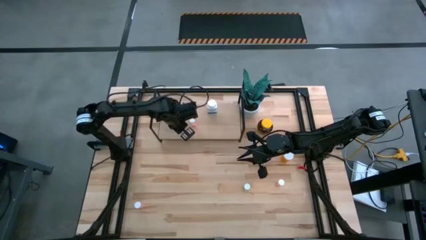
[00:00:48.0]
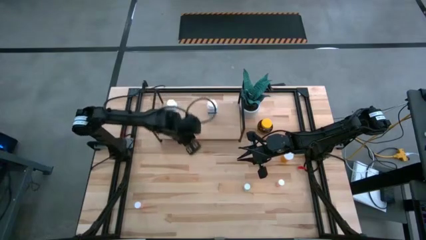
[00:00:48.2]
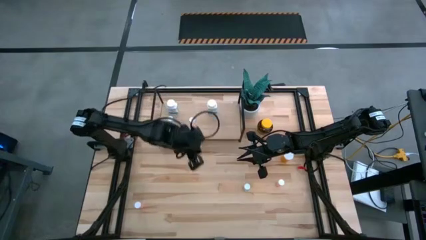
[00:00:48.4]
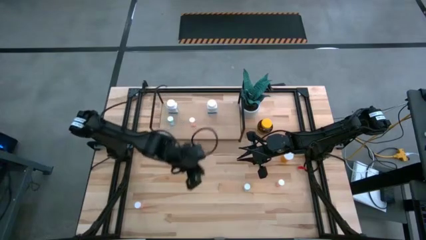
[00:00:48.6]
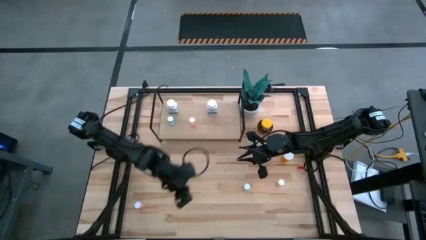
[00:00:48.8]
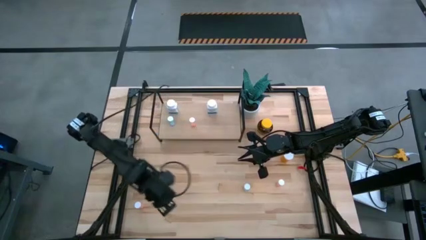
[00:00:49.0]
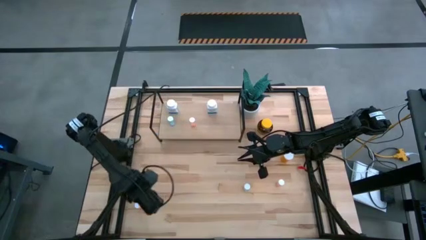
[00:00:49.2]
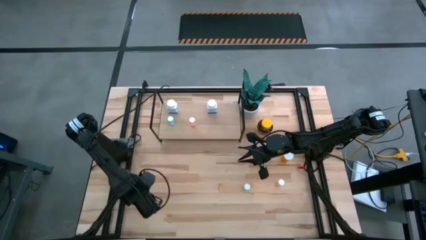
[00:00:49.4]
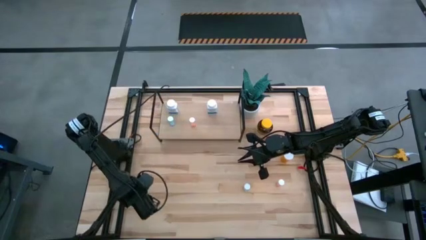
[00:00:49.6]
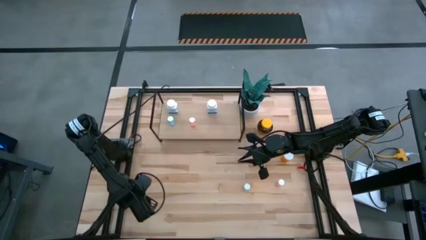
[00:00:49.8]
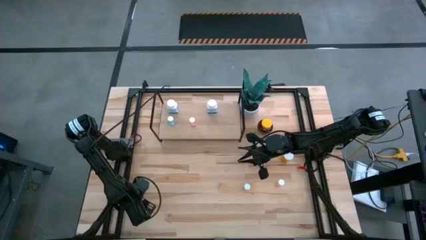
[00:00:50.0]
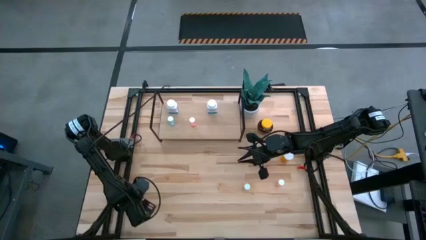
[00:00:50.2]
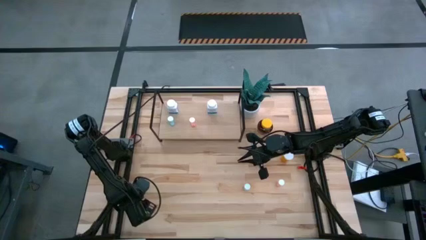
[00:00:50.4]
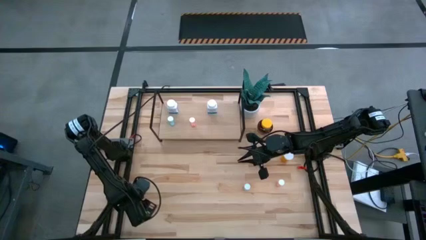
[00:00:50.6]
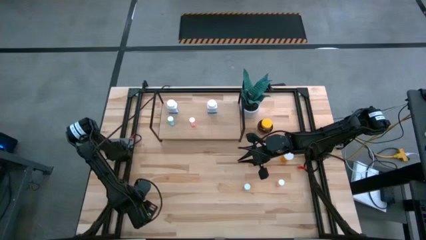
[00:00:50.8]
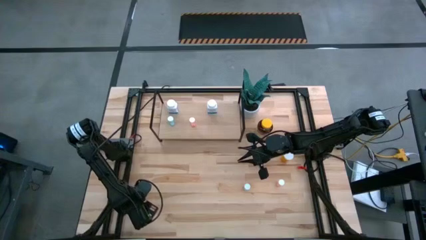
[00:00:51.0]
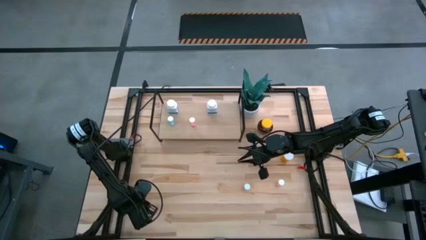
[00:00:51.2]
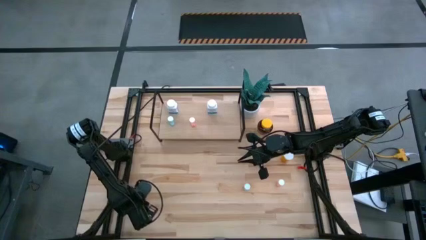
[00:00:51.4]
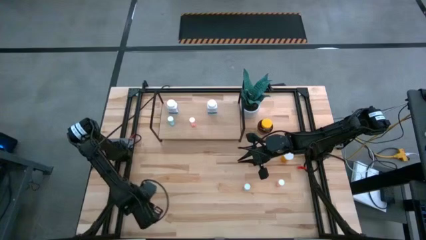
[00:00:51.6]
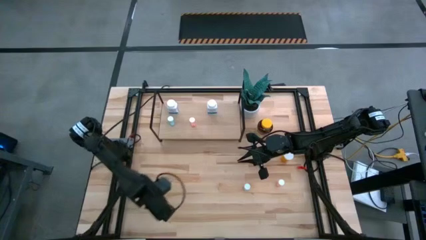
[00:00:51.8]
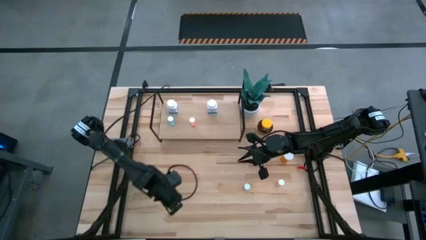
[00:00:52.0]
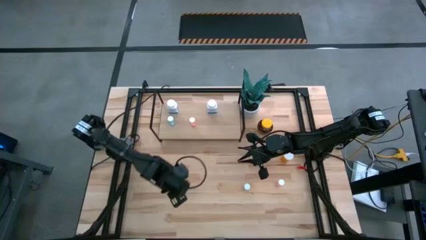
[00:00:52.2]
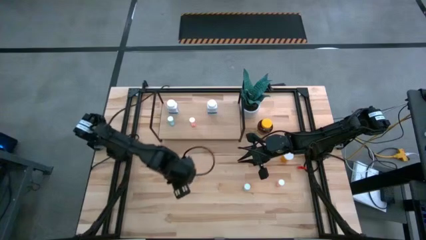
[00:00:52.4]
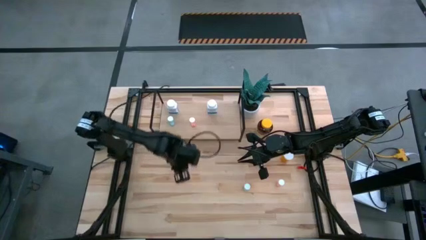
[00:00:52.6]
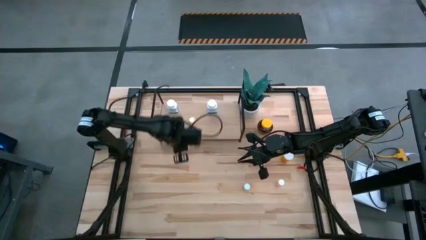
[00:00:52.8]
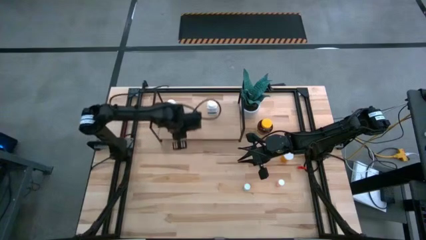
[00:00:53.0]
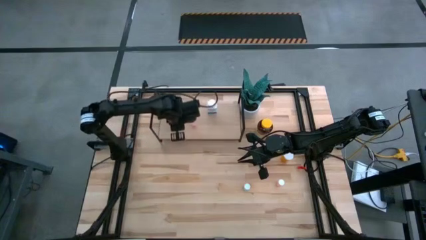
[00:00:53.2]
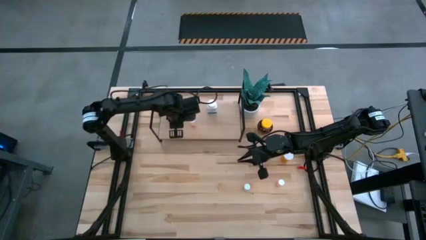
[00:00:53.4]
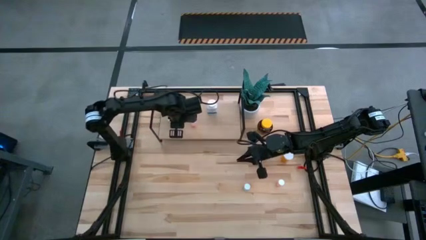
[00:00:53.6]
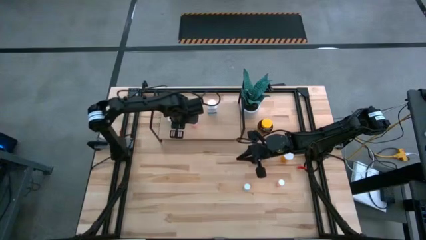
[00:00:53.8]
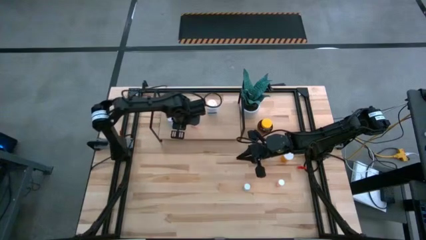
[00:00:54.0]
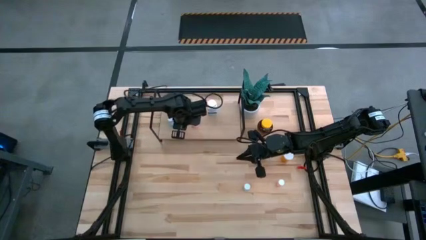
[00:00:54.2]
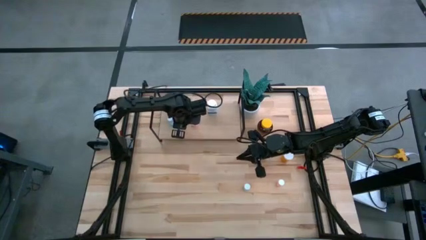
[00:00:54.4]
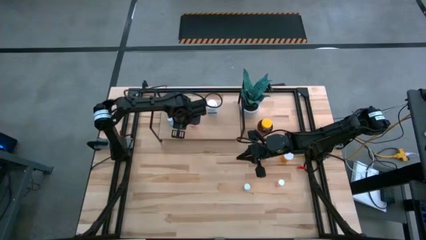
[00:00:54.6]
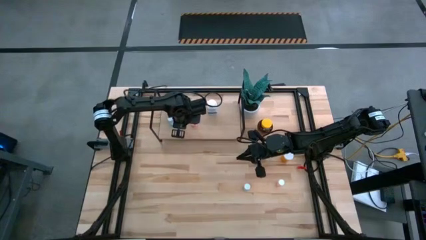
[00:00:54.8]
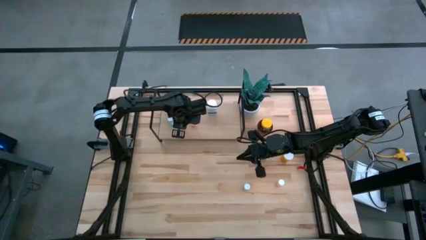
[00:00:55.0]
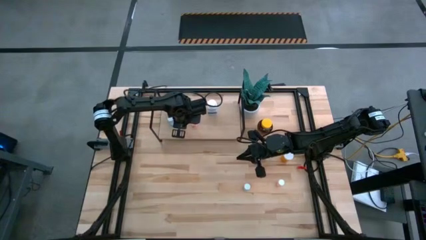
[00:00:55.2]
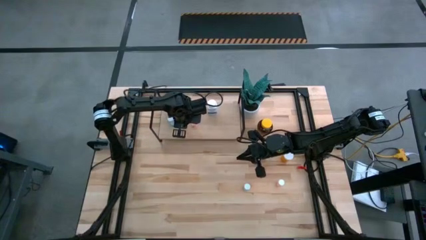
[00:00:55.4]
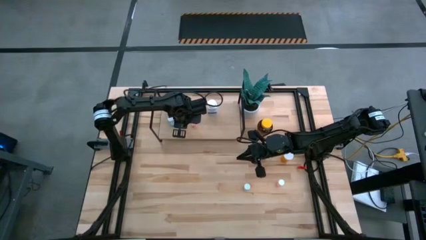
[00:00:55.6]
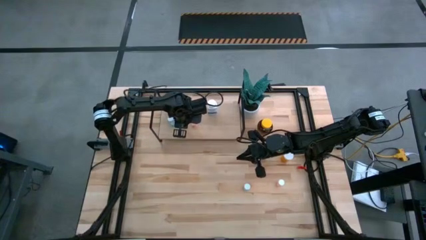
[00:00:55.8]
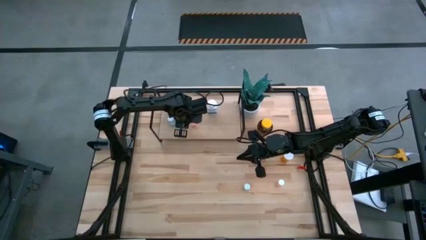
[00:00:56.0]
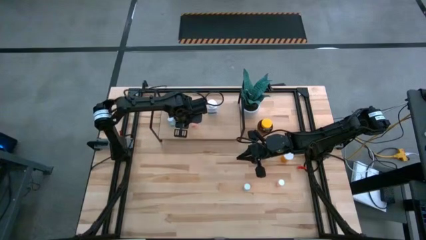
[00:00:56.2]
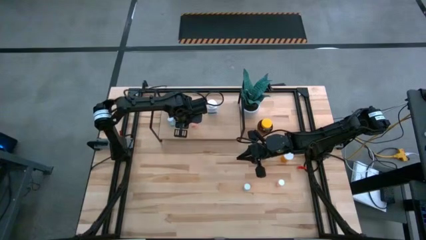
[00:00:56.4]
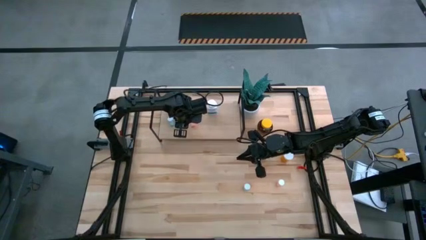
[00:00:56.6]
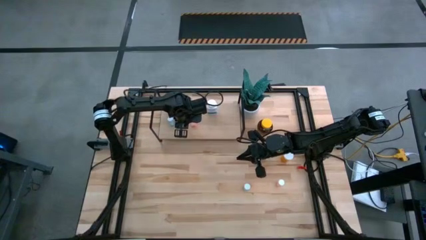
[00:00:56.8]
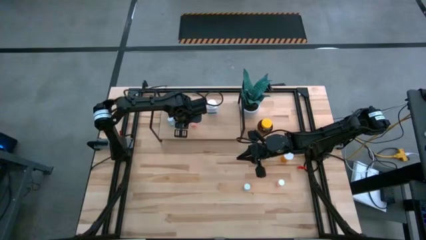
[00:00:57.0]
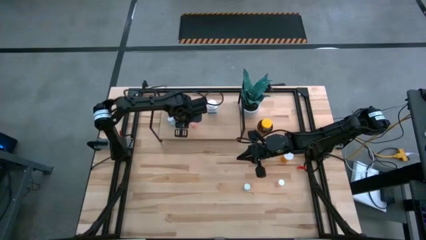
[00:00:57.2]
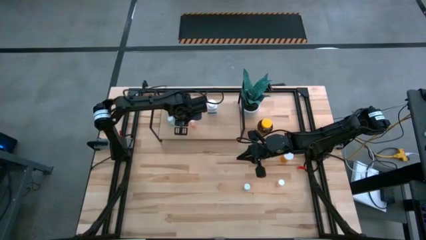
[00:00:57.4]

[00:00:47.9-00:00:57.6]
Task: Pick and place medicine bottles onto shelf by color
Put the left pink medicine bottle on the shelf

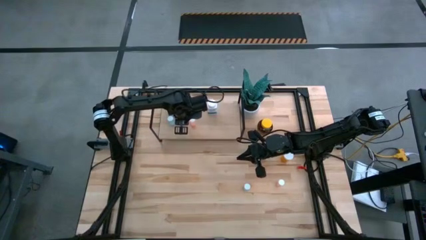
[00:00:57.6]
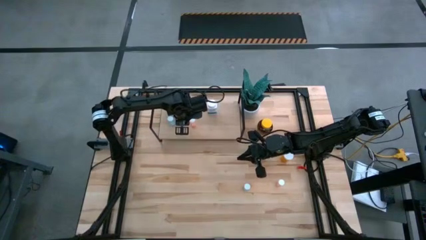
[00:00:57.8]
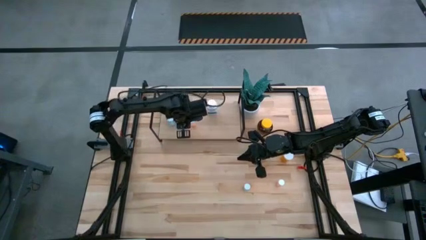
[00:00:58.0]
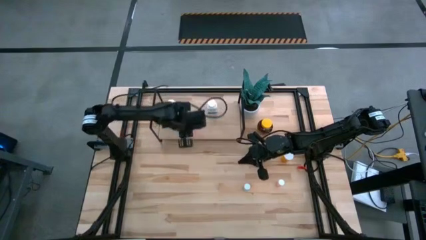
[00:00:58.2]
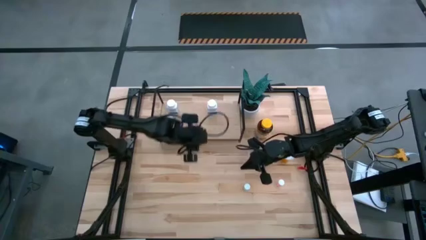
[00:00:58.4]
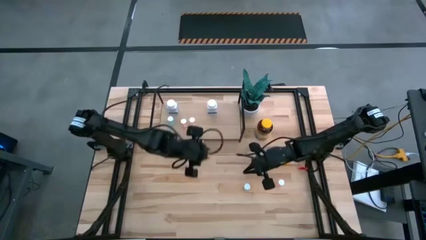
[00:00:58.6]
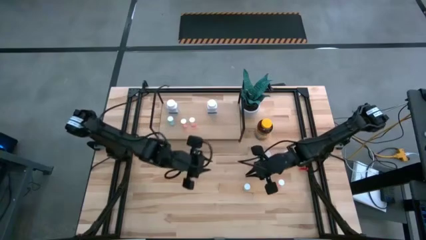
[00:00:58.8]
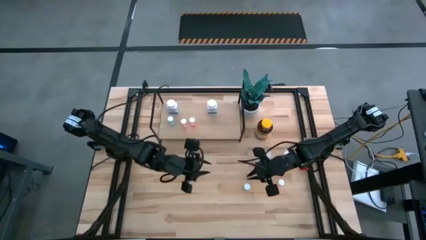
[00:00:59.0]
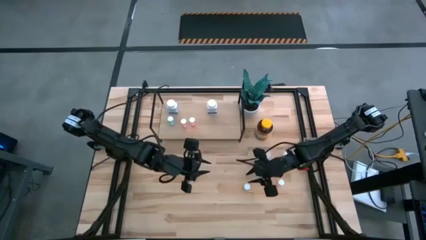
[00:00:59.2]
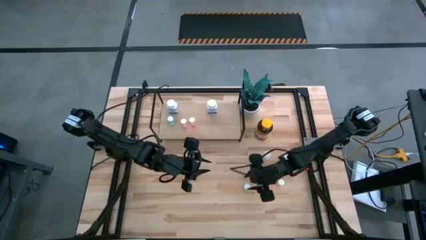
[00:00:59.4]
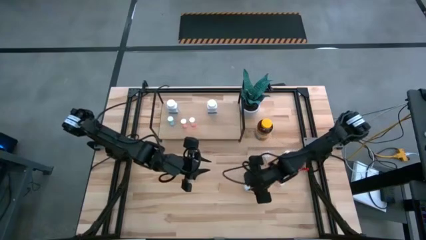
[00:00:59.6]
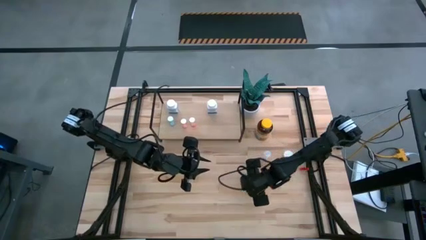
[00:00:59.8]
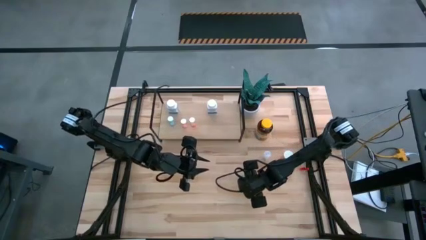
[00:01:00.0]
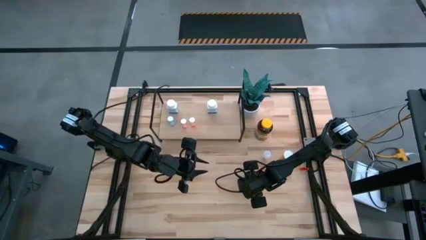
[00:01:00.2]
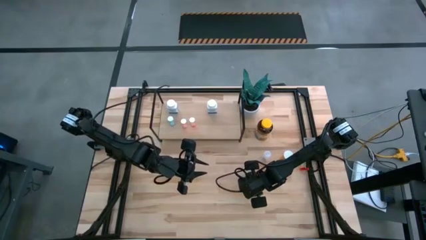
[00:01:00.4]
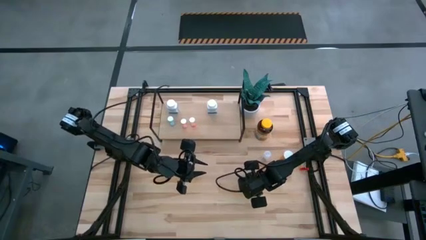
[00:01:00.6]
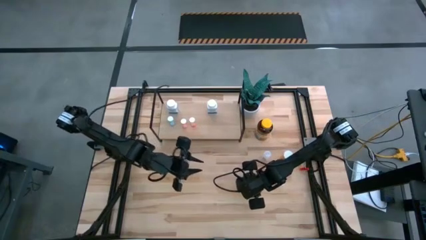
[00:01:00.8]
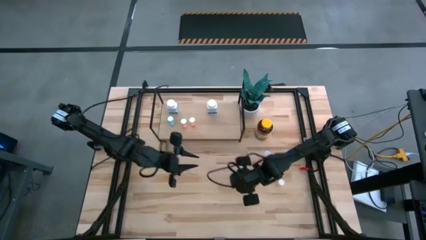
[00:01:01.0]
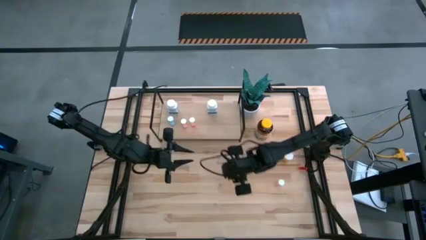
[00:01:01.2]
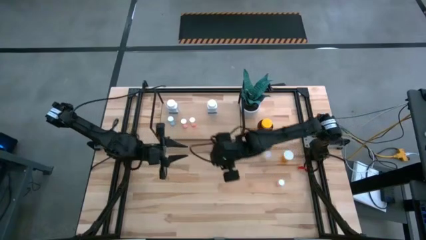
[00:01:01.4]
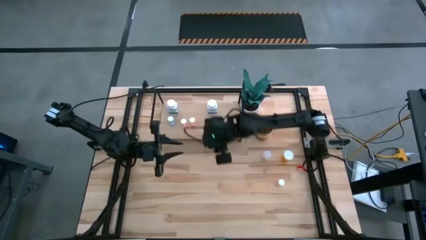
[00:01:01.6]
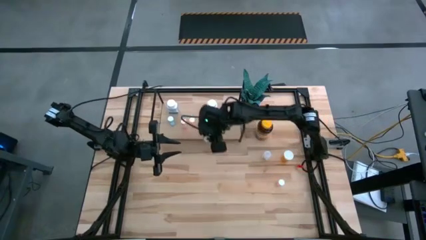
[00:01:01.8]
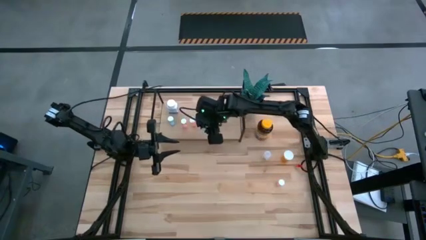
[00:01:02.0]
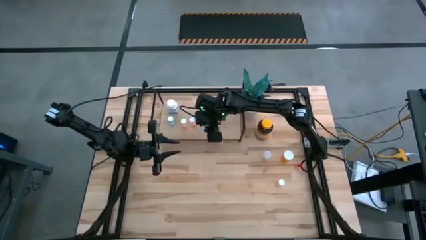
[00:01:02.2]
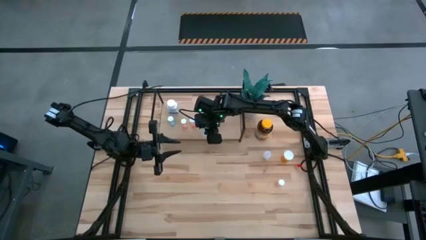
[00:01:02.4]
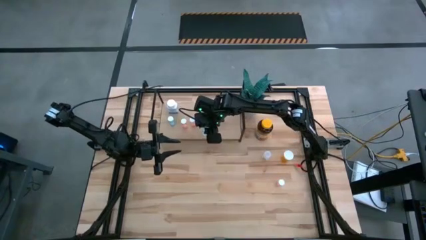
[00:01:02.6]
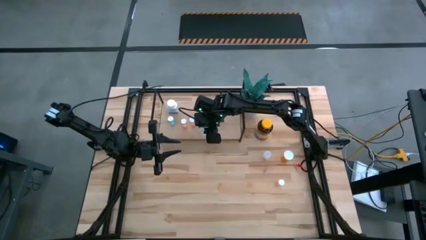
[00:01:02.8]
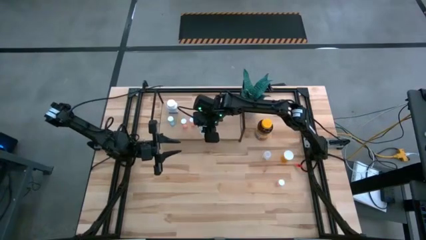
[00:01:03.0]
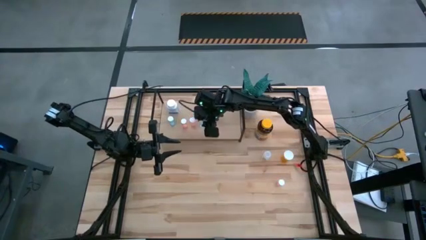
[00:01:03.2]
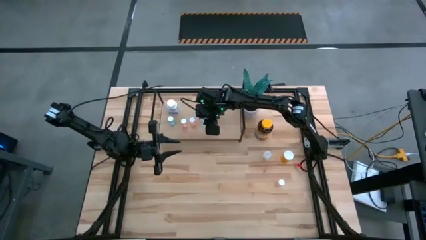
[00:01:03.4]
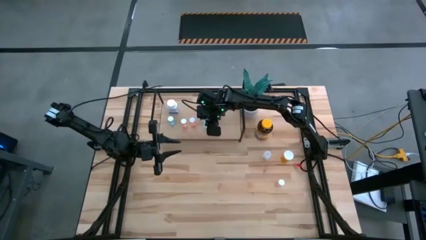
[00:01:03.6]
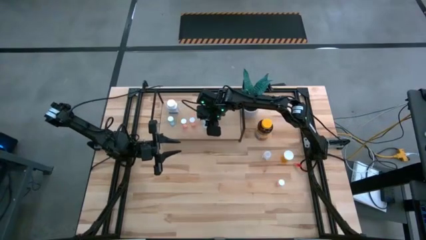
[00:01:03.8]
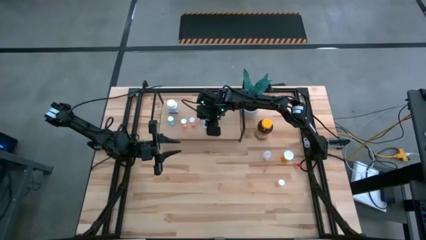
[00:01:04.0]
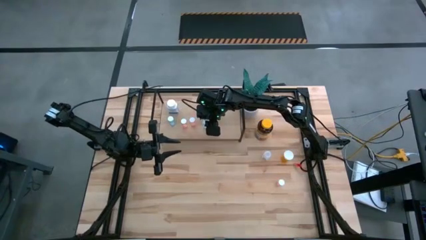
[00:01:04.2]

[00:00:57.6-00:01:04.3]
Put the blue medicine bottle on the shelf

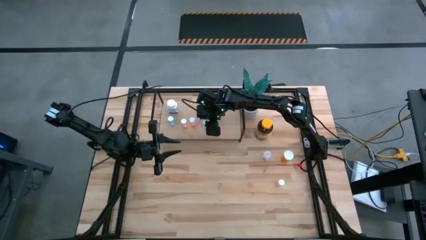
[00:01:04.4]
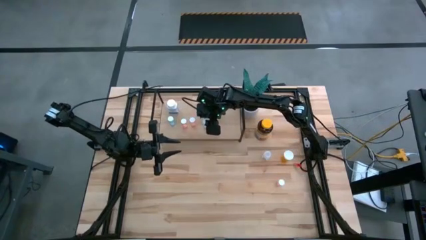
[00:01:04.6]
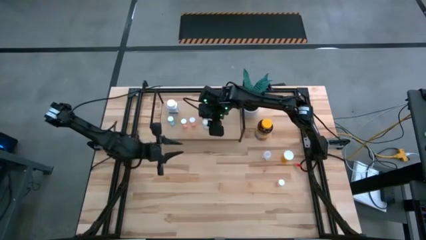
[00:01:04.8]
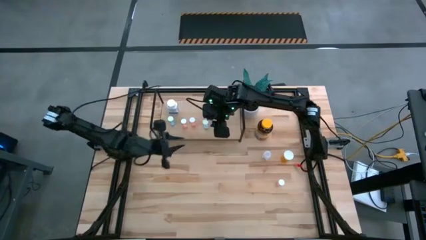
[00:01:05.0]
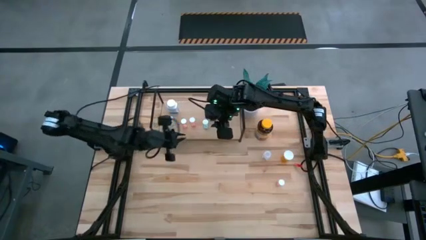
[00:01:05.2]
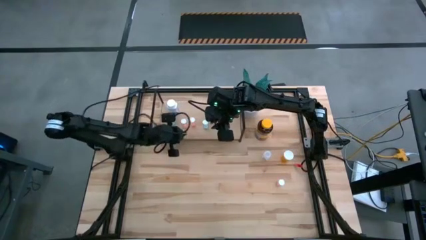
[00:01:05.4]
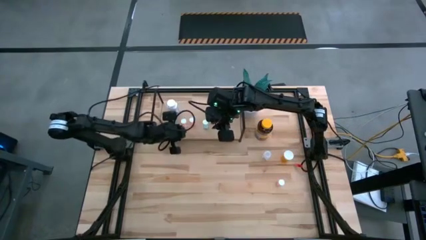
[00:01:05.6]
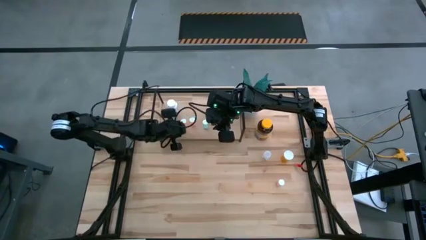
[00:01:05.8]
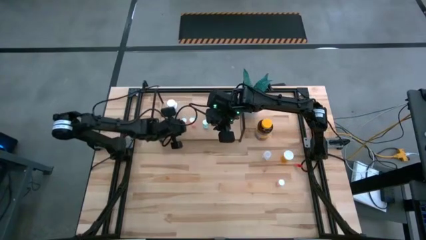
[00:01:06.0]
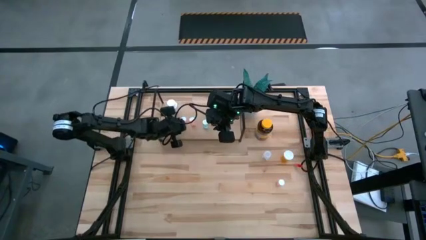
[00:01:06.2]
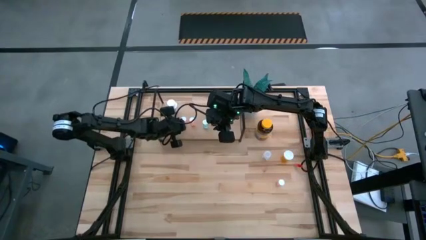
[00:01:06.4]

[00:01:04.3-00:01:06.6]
Adjust the pink medicine bottle on the shelf
